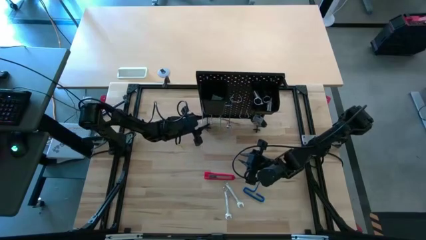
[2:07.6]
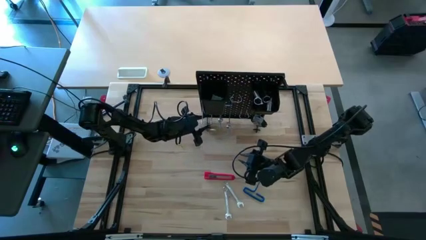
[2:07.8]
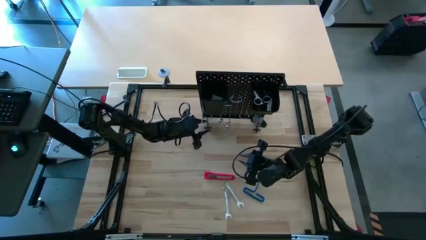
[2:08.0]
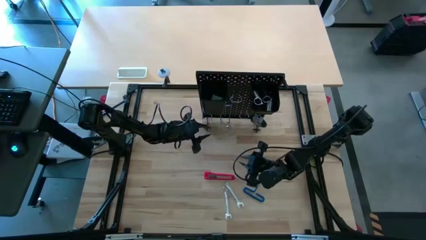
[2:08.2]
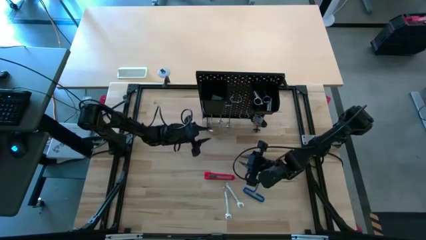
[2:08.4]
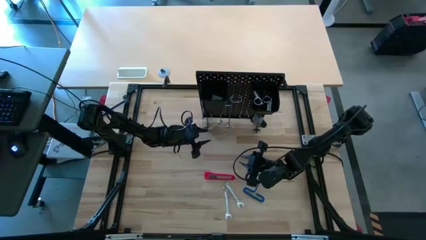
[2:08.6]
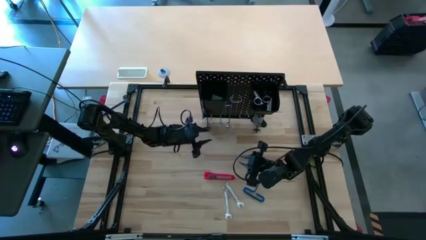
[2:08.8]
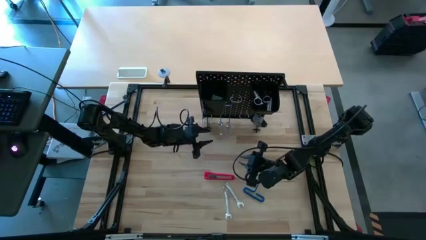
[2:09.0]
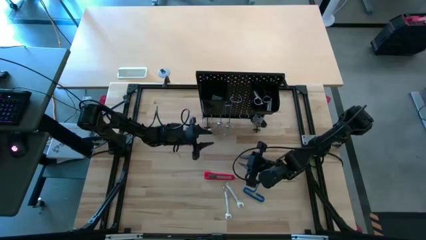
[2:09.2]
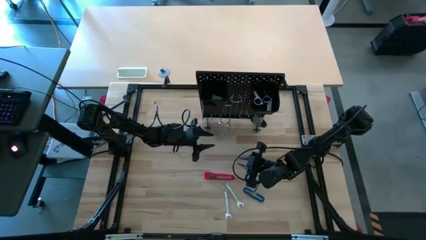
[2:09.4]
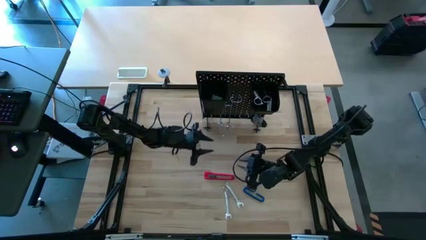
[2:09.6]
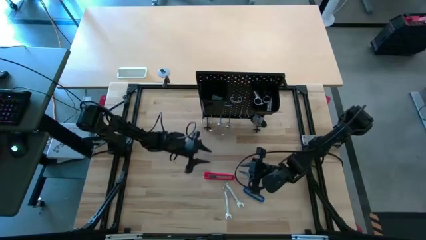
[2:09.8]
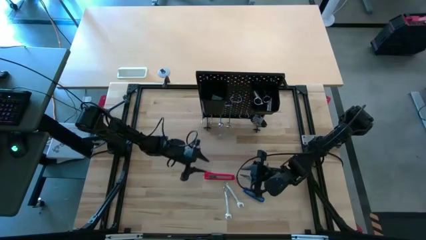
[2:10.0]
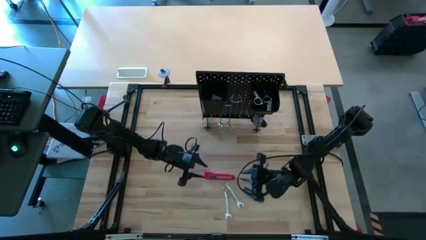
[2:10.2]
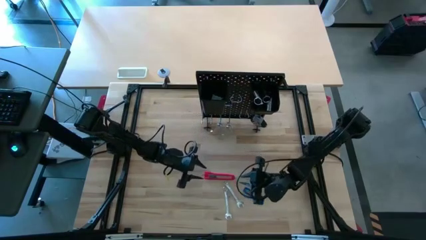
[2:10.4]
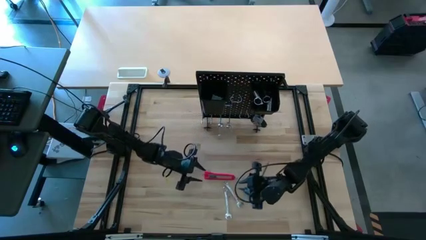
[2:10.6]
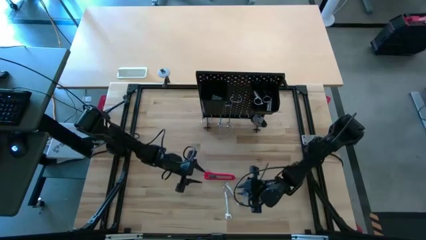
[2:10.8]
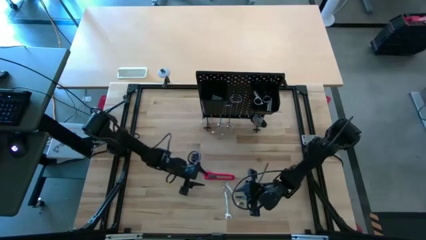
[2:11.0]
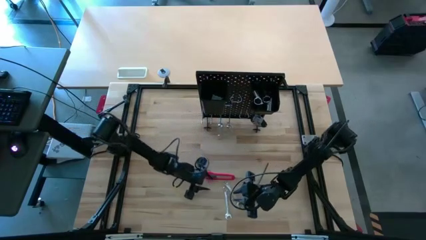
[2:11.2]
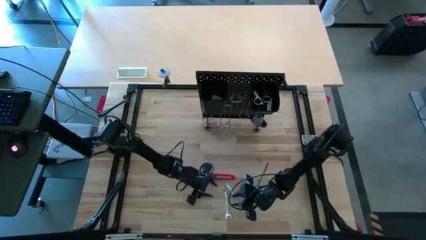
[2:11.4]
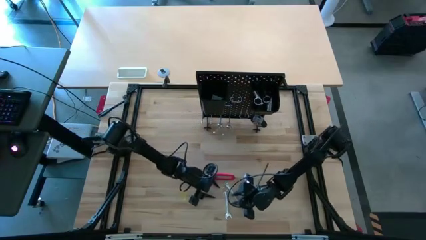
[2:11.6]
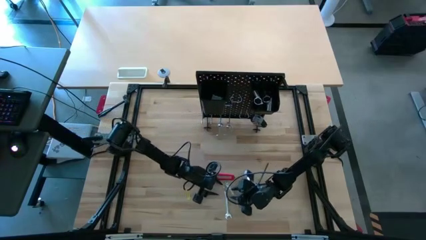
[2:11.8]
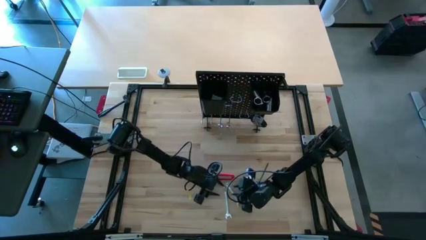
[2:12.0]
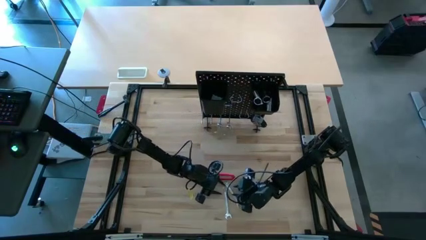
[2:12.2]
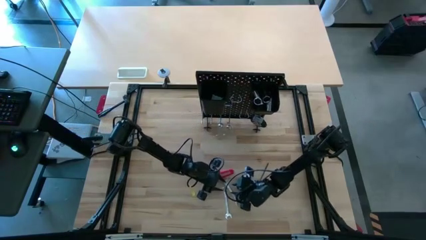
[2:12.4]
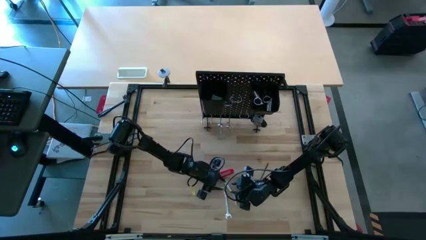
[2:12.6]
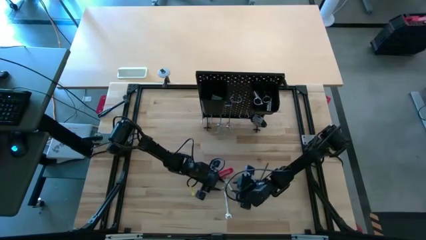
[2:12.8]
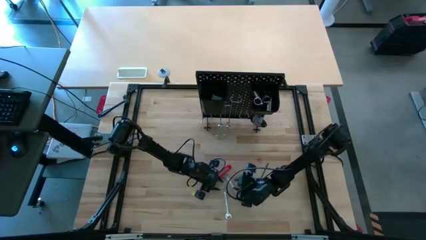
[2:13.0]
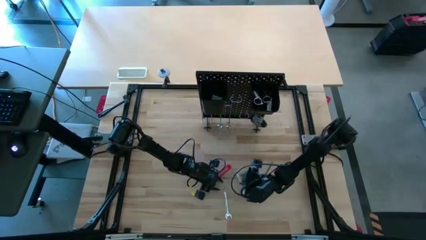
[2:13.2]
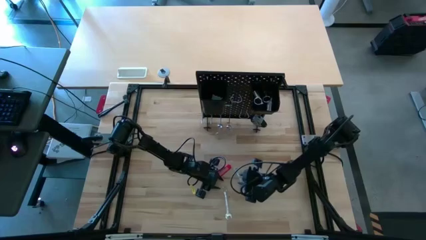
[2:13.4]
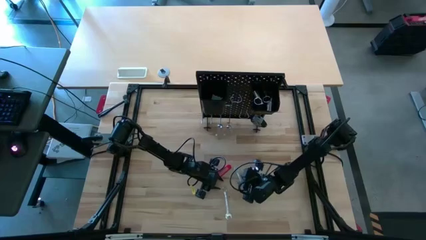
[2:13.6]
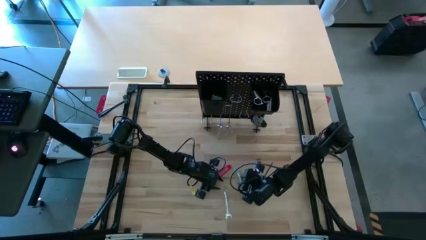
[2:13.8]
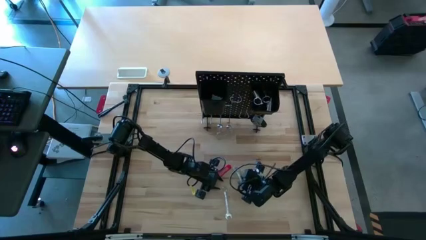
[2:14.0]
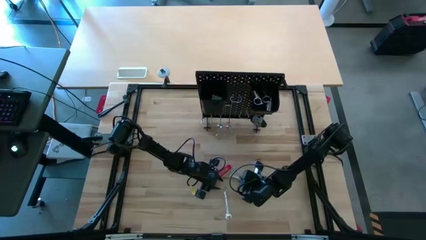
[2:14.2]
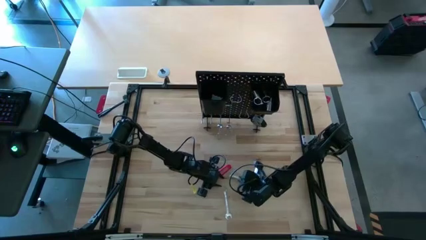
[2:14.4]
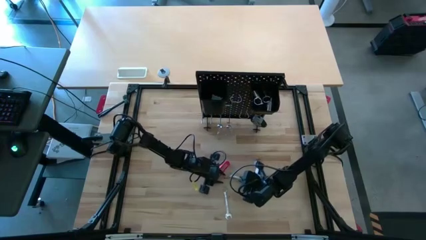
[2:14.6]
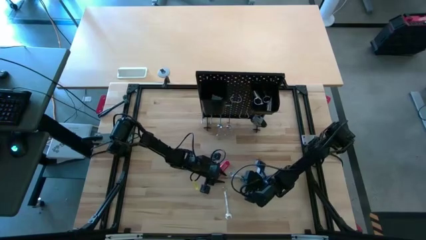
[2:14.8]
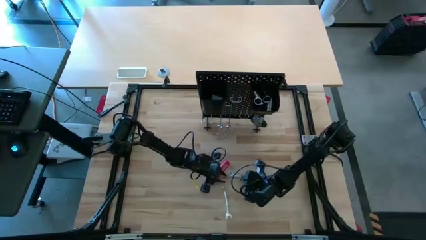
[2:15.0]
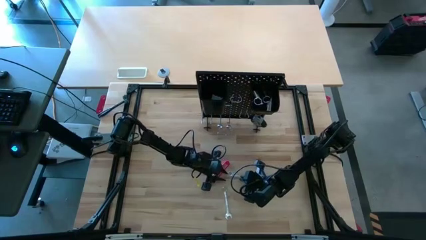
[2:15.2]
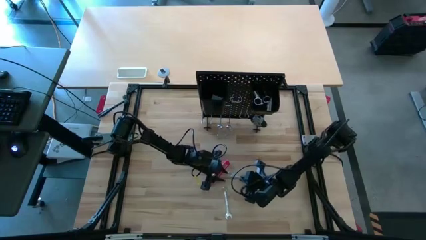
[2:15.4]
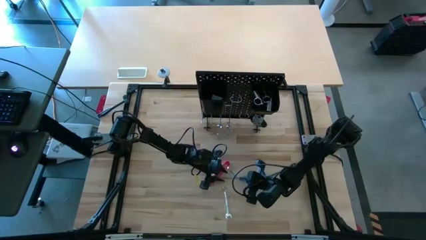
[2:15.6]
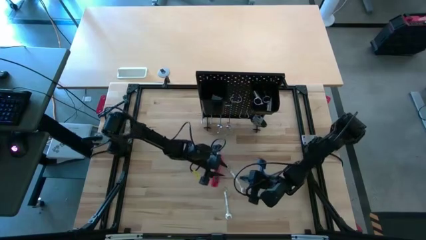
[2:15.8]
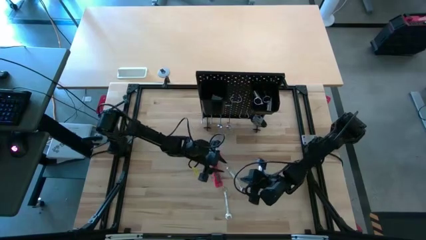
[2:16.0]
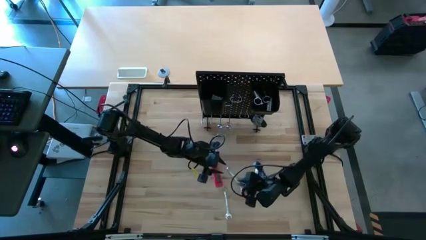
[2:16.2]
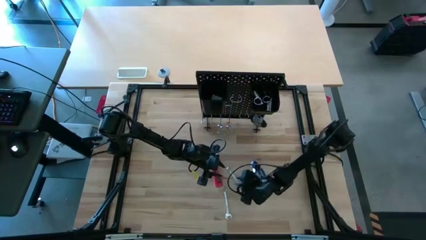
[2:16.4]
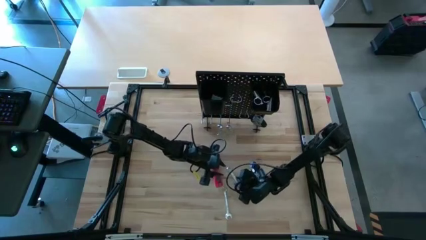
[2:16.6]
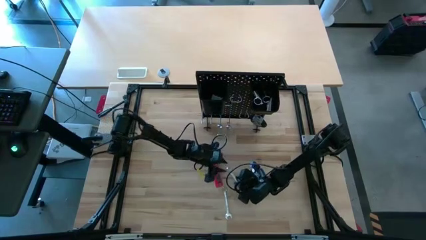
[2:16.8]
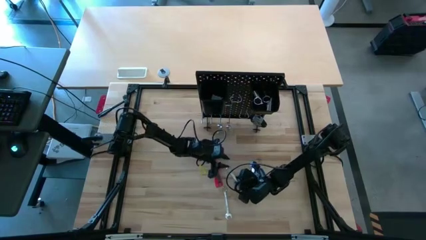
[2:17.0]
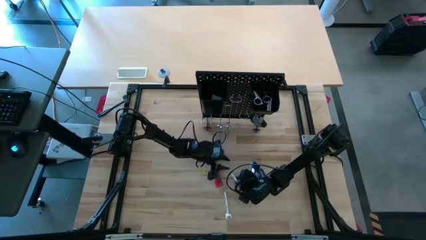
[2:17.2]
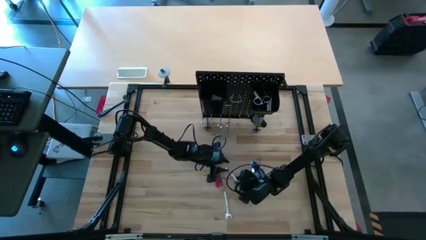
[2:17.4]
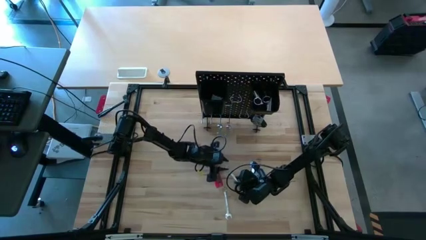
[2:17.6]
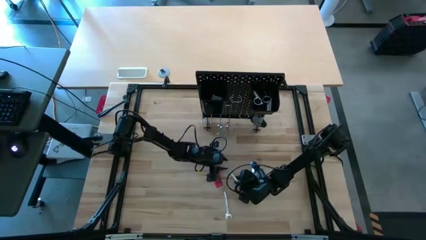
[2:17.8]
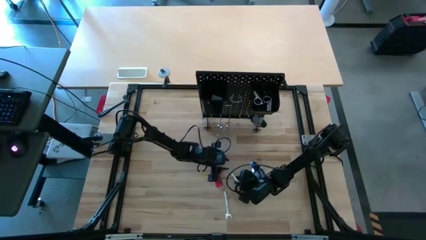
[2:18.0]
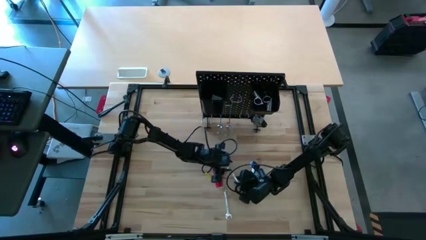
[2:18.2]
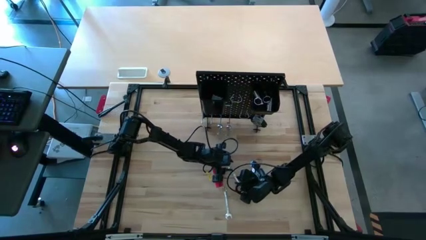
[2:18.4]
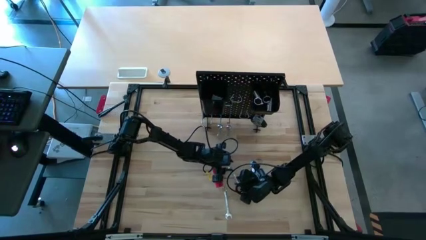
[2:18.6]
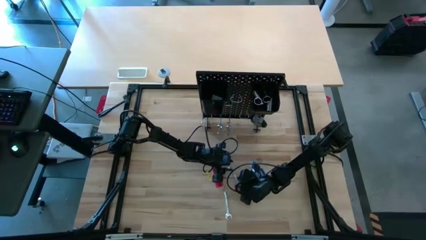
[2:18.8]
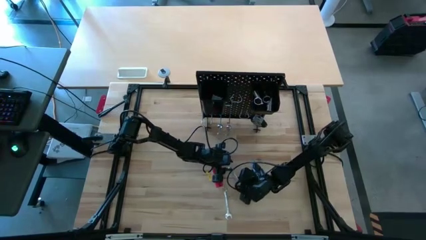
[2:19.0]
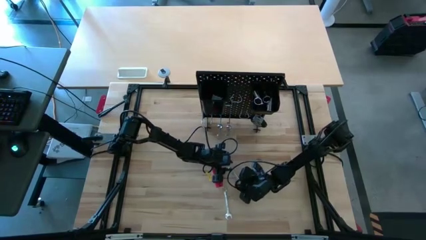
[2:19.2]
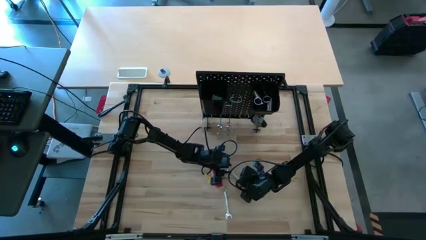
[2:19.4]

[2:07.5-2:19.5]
Task: Hang tools onto peg board
Hang the wrench on the peg board

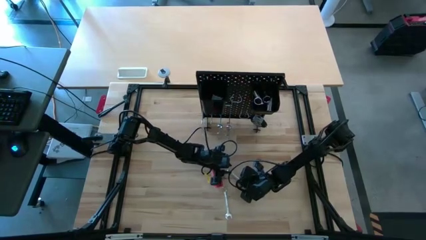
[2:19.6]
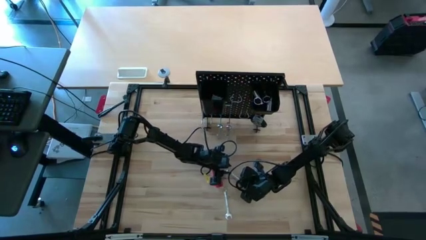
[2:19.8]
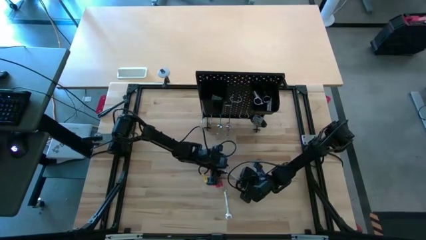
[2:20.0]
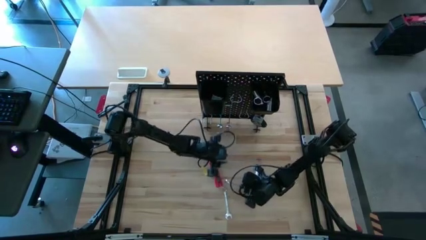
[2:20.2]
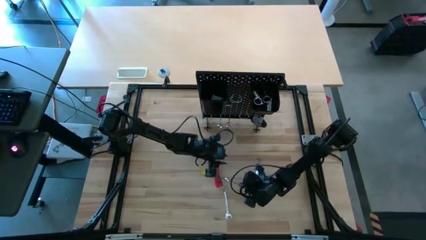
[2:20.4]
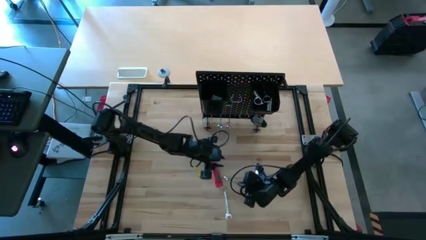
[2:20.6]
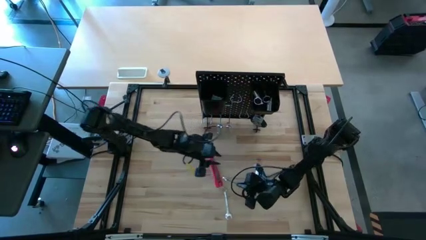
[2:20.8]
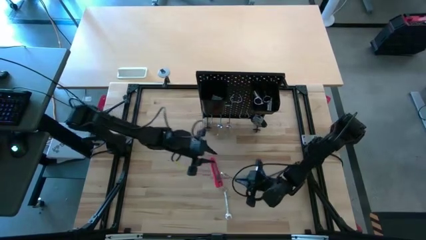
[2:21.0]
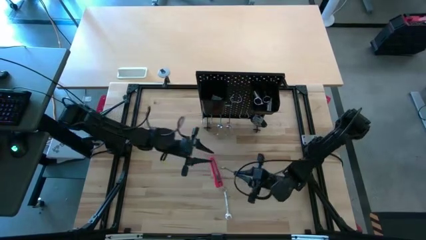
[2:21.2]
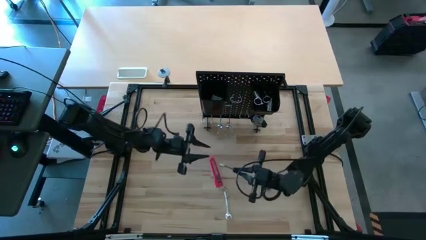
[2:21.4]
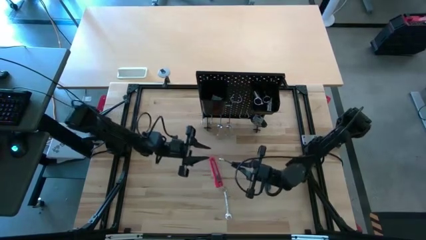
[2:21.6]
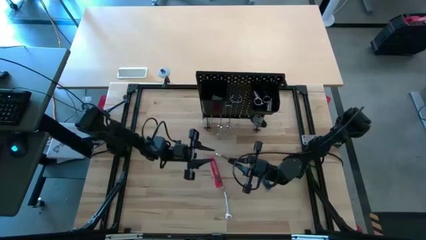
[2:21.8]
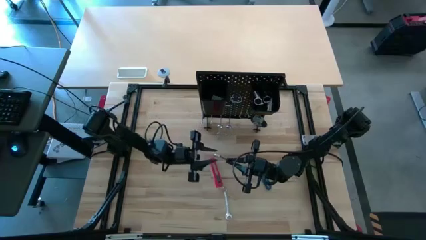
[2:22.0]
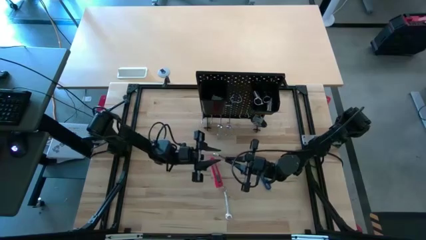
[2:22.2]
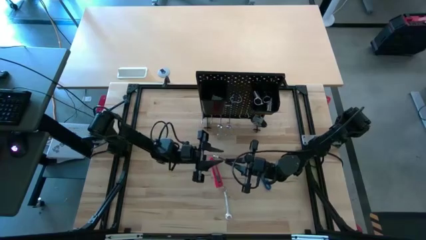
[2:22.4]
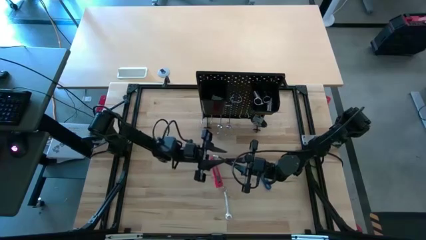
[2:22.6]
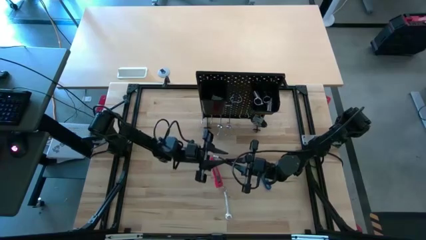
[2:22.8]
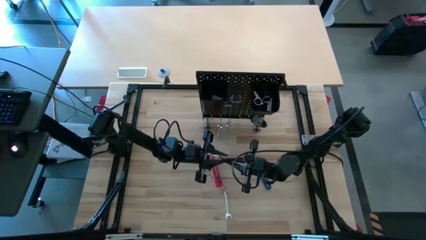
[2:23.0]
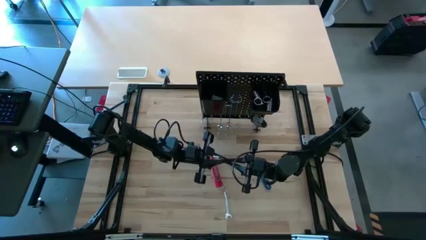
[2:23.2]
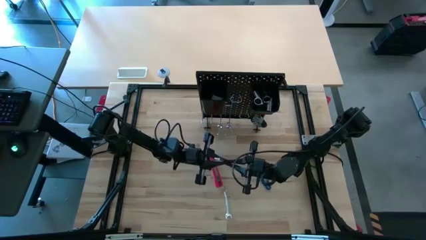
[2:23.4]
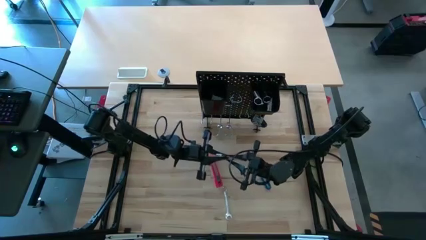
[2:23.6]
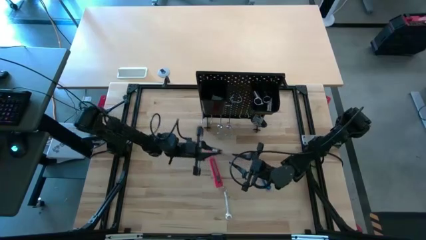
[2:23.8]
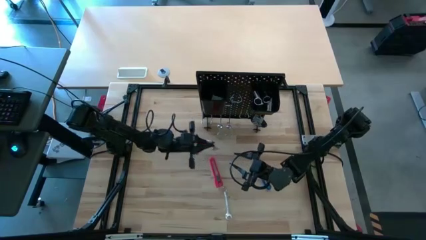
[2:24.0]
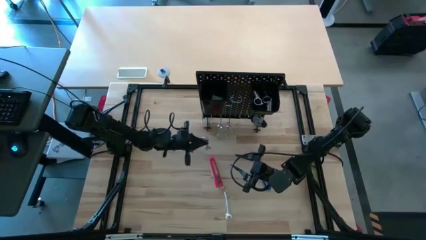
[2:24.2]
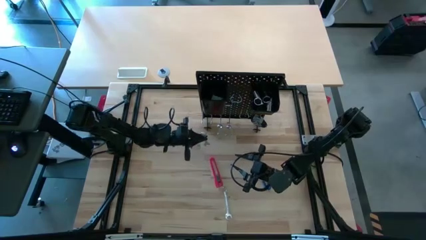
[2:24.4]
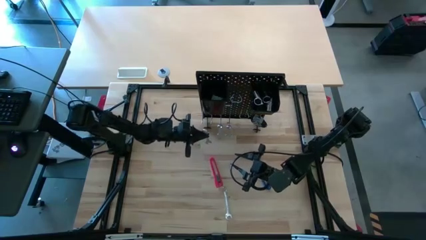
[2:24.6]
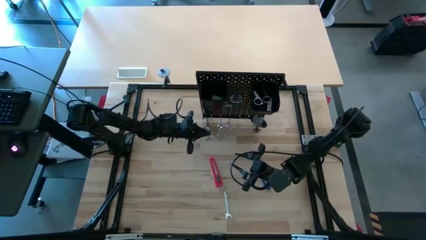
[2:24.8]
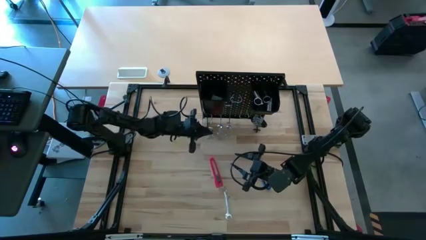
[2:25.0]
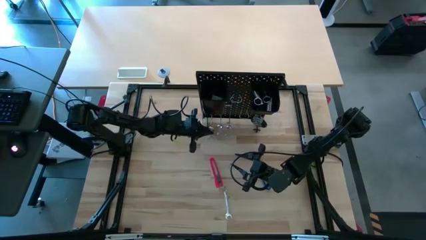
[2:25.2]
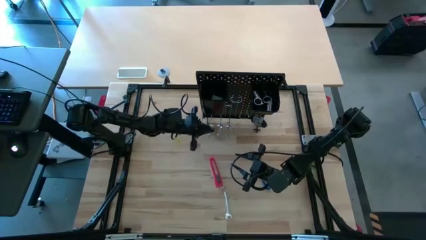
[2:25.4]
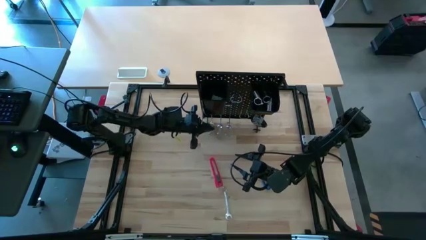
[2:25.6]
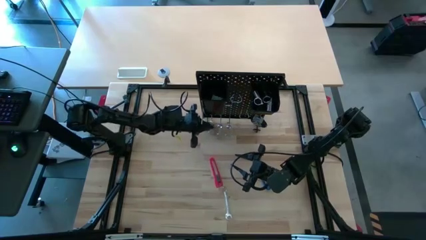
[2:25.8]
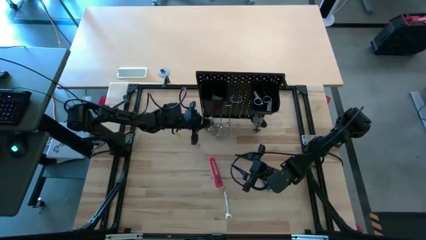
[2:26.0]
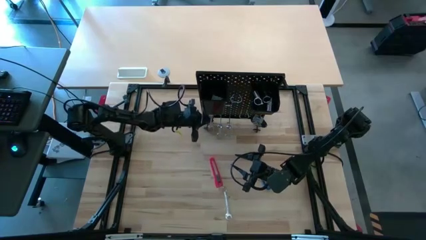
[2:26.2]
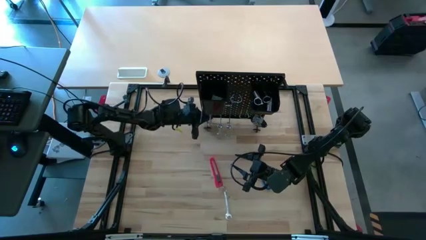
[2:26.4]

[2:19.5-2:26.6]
Hang the wrench on the peg board
